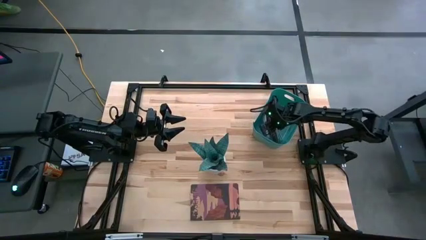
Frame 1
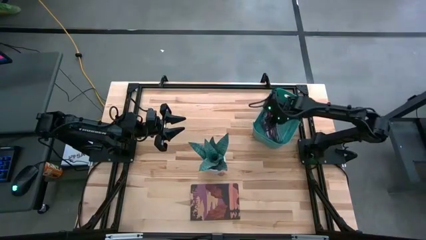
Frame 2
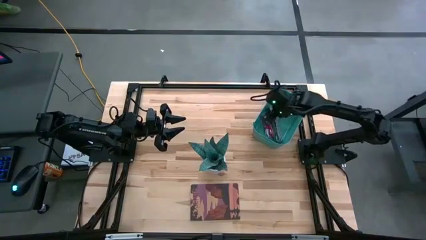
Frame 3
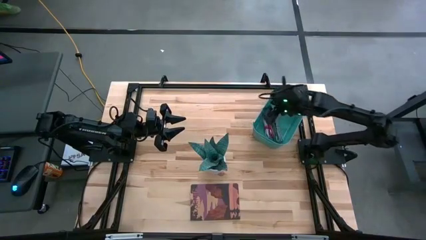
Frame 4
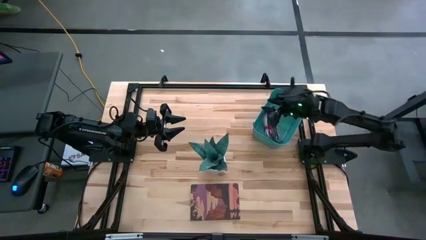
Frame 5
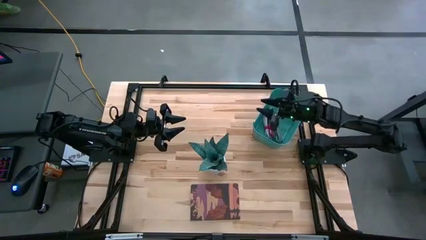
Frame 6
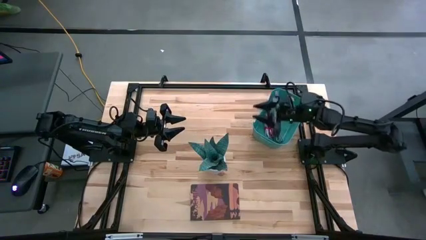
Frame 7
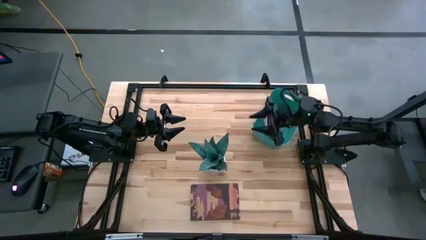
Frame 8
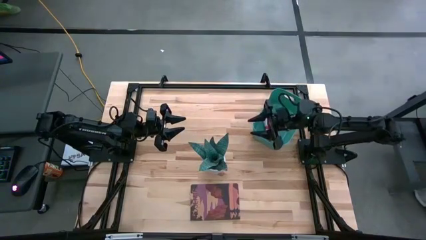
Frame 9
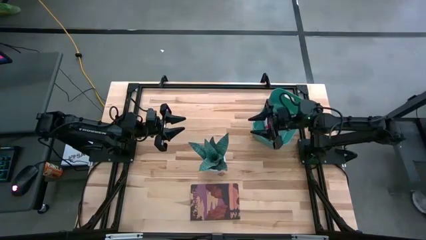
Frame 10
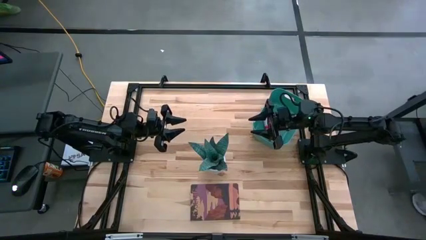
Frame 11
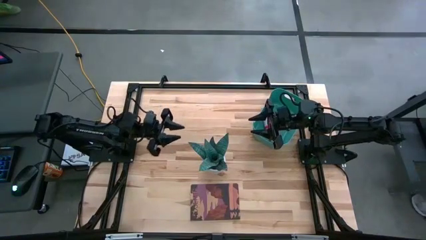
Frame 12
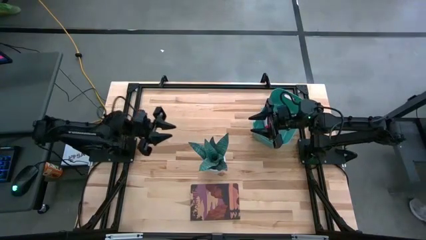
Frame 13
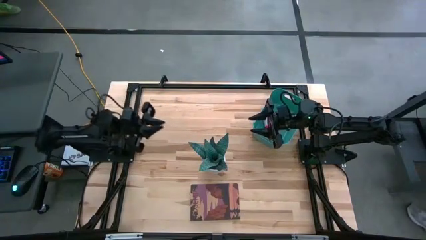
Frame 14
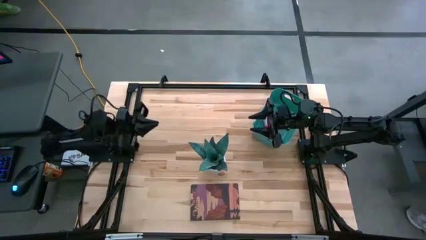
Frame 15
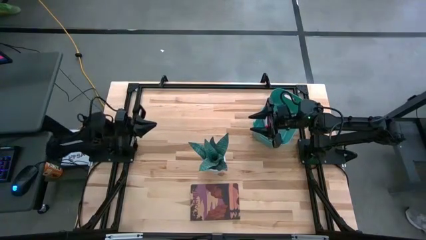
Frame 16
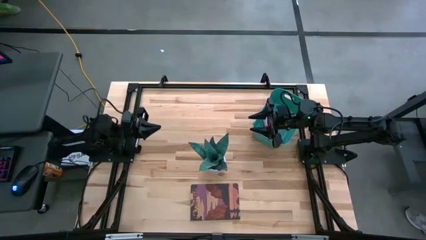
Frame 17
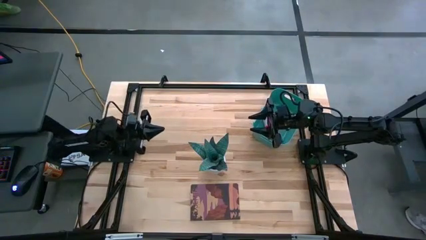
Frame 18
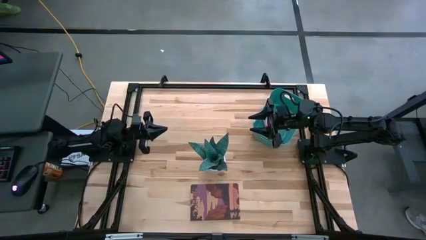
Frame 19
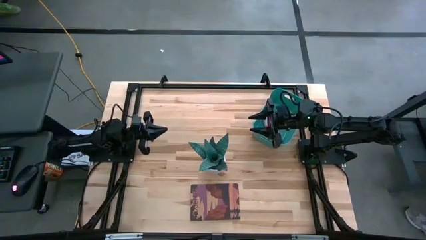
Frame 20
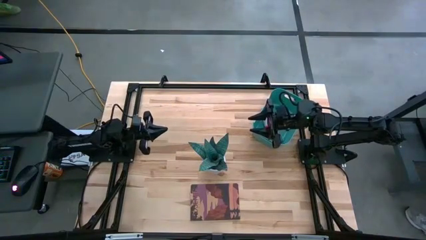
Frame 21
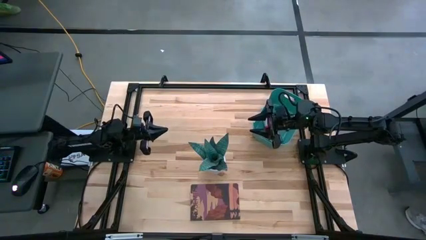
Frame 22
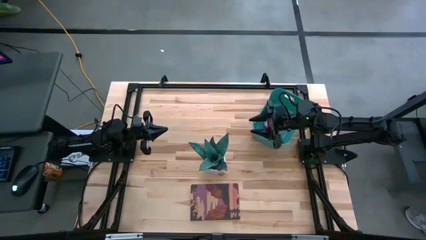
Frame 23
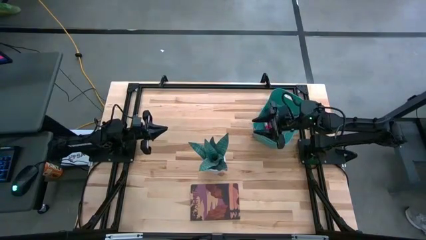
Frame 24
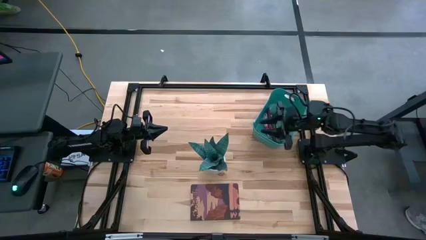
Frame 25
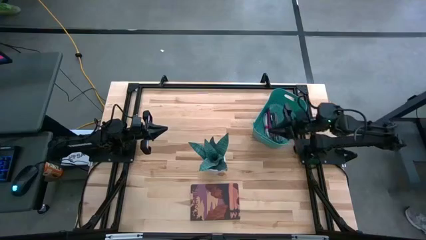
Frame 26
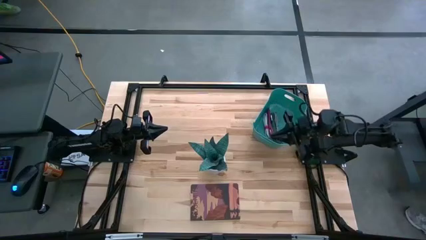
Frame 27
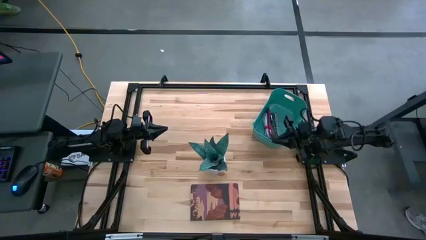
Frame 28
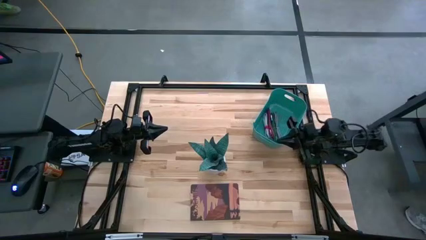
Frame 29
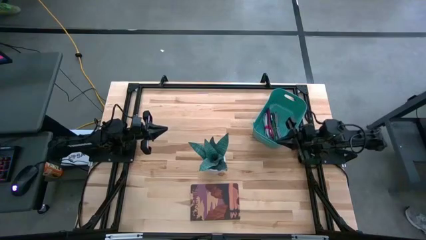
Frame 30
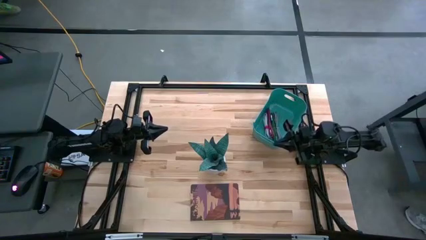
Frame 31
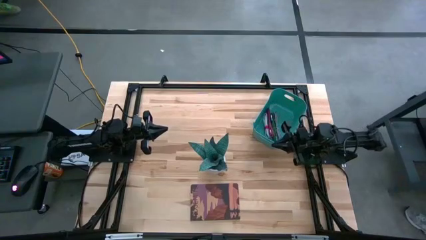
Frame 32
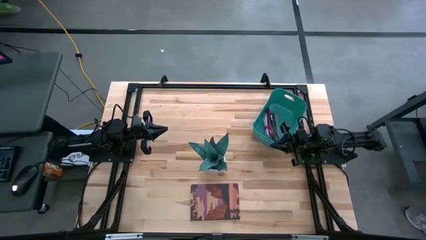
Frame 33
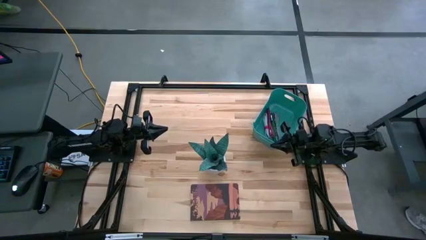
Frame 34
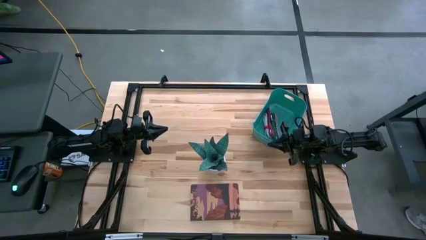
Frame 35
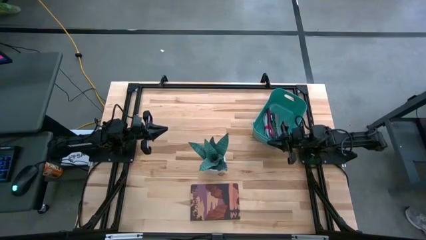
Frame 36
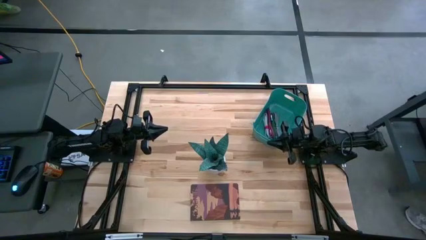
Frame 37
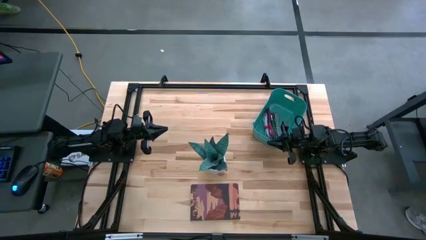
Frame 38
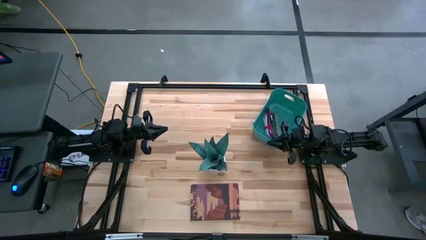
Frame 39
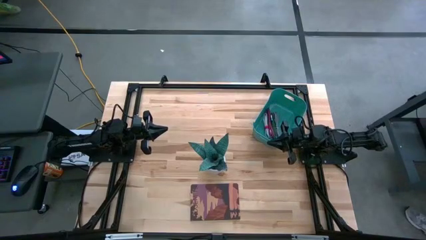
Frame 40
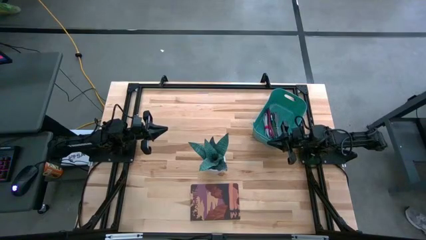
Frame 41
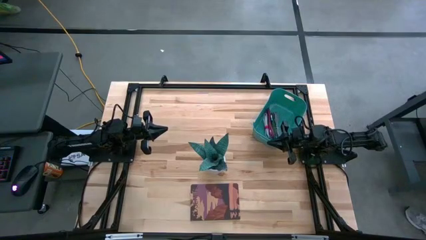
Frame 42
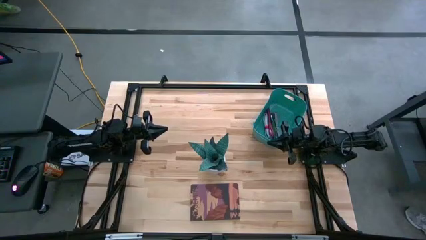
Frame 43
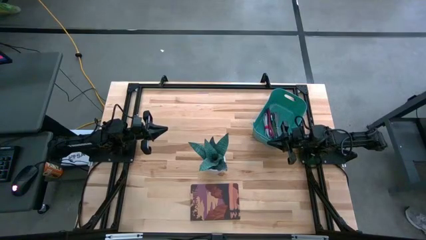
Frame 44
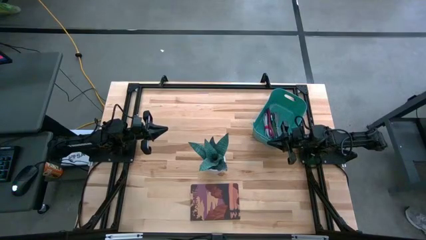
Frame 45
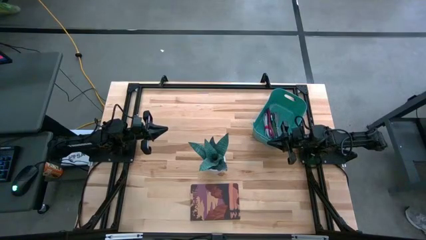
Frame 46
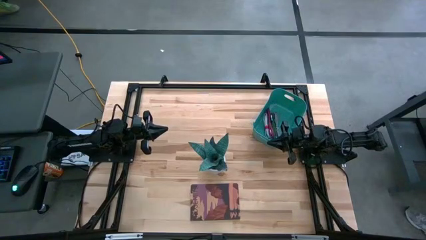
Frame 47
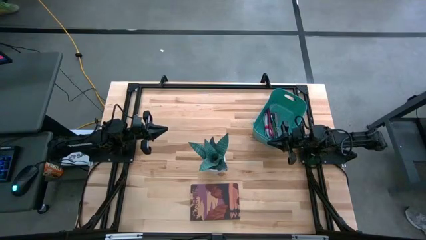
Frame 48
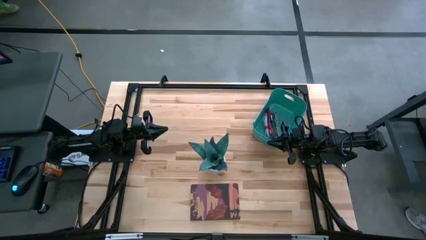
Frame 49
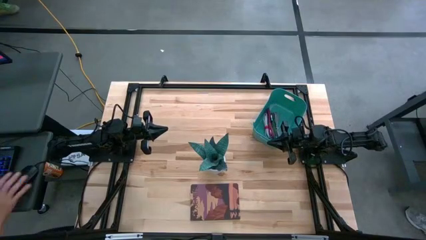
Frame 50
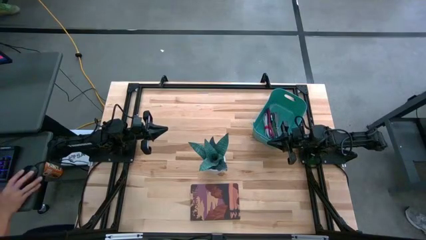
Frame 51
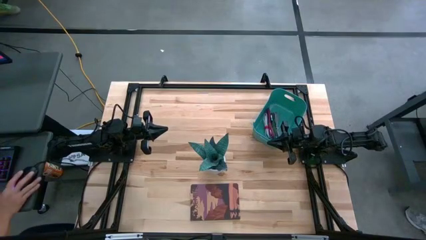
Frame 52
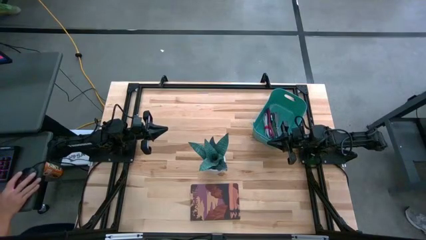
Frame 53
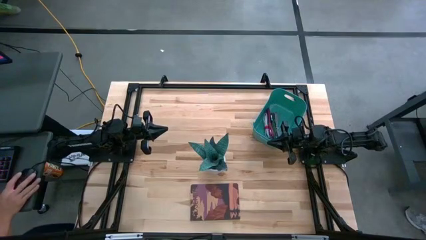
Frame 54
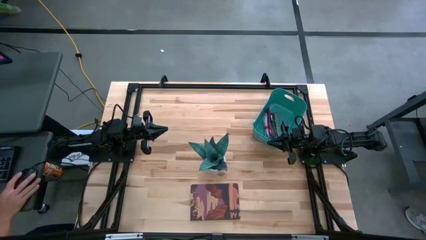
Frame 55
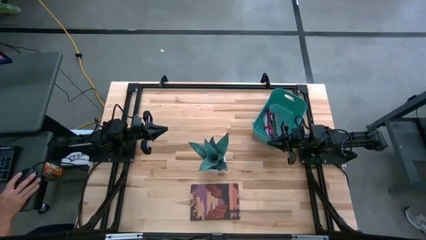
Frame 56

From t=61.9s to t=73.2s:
Task: Pick and place USB-C Cables
Return to Home Position
